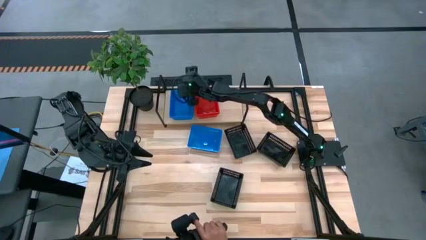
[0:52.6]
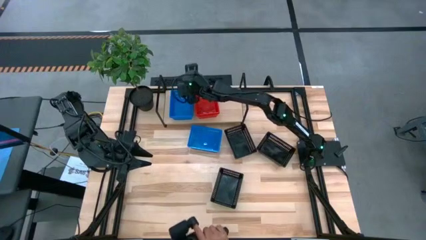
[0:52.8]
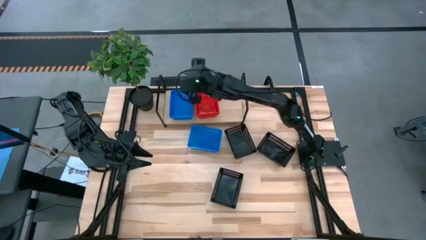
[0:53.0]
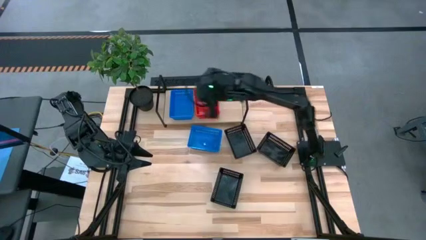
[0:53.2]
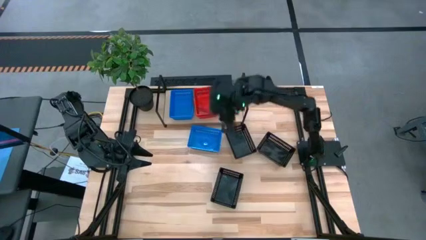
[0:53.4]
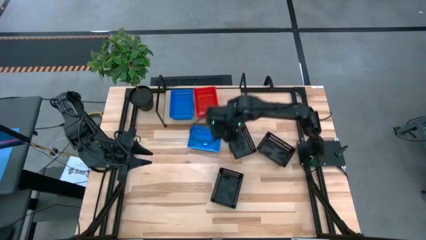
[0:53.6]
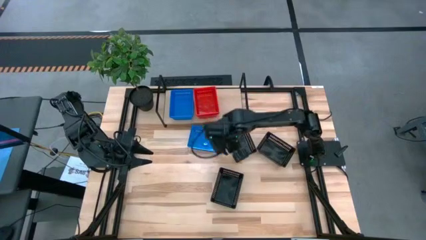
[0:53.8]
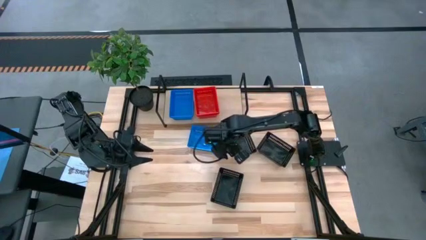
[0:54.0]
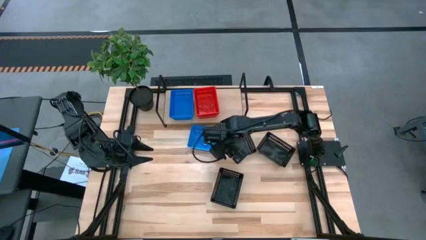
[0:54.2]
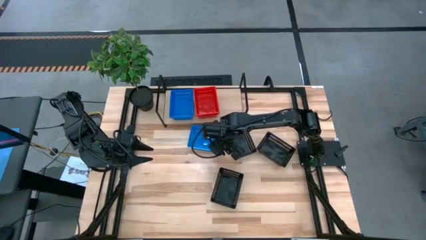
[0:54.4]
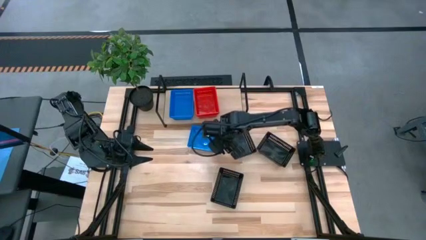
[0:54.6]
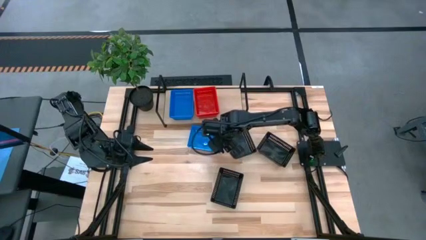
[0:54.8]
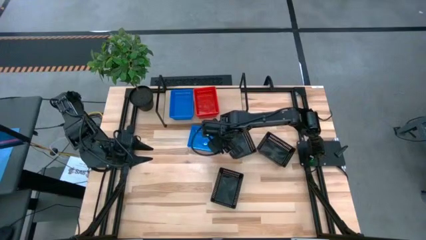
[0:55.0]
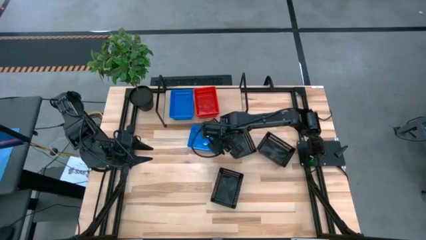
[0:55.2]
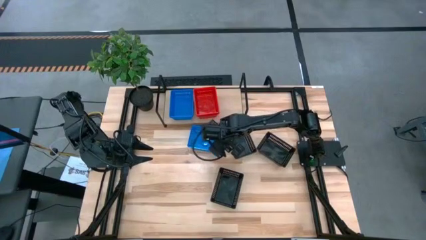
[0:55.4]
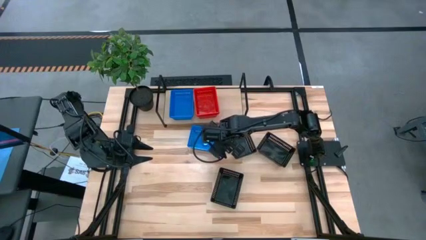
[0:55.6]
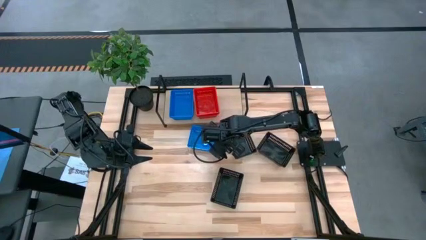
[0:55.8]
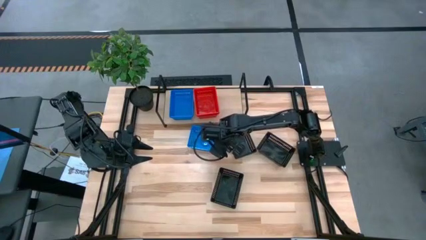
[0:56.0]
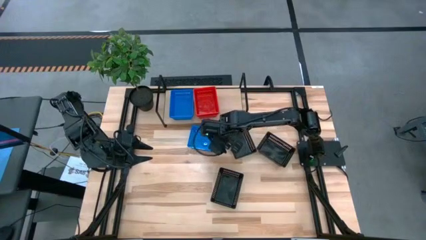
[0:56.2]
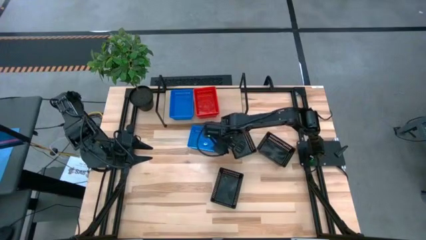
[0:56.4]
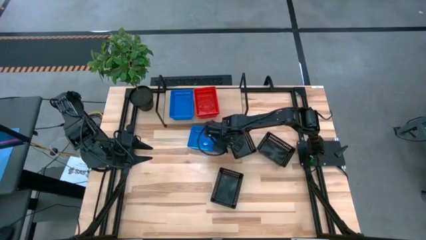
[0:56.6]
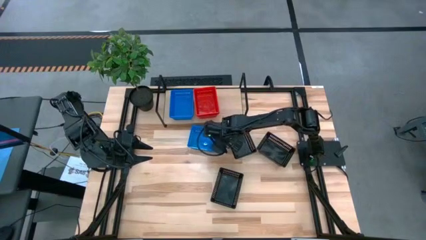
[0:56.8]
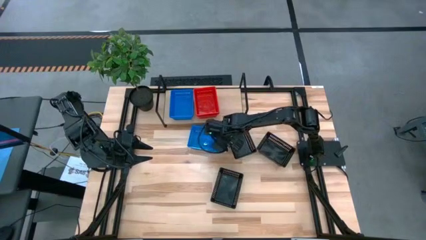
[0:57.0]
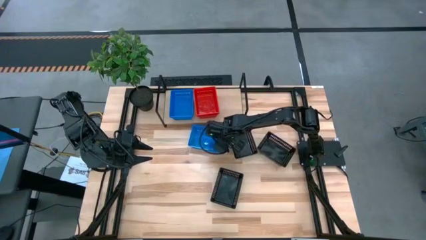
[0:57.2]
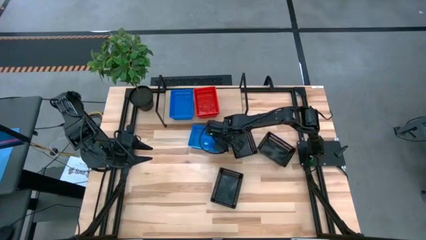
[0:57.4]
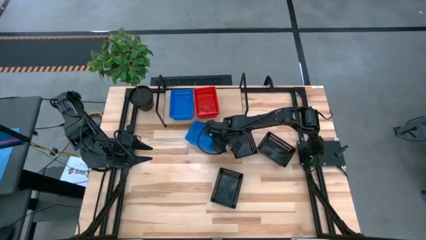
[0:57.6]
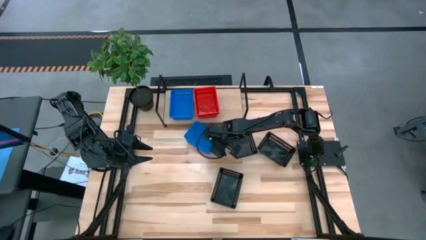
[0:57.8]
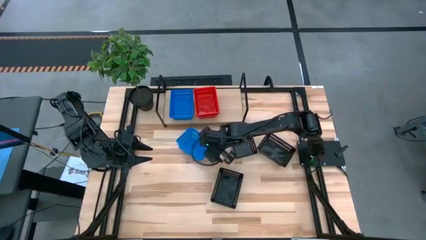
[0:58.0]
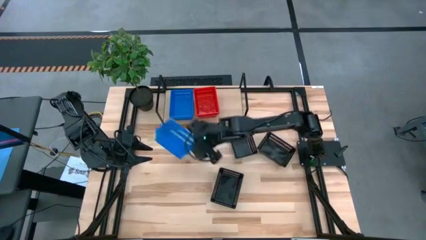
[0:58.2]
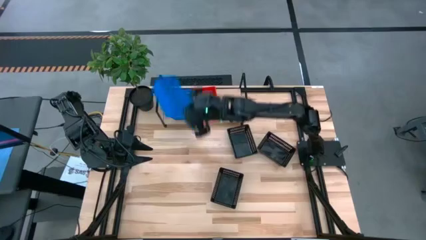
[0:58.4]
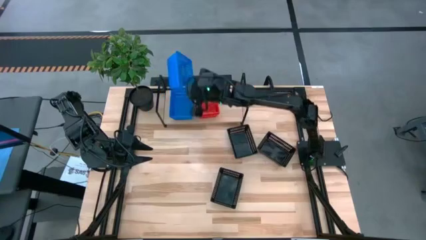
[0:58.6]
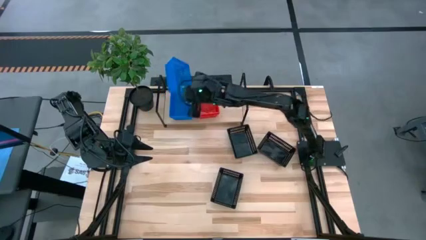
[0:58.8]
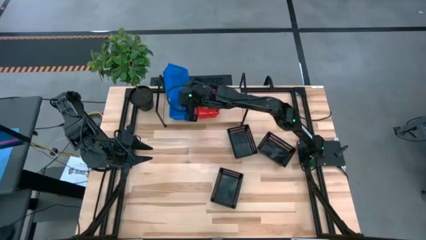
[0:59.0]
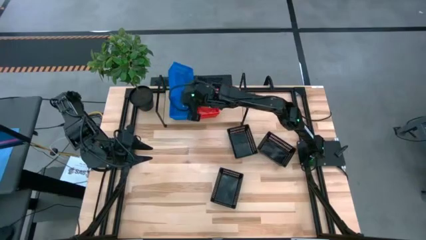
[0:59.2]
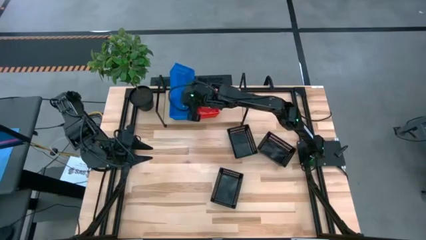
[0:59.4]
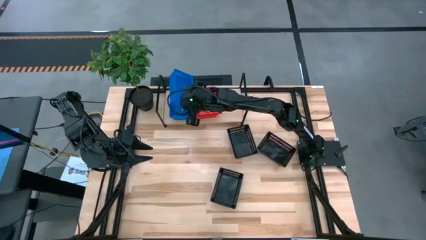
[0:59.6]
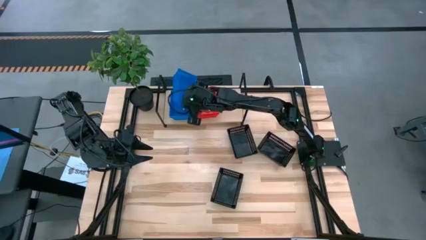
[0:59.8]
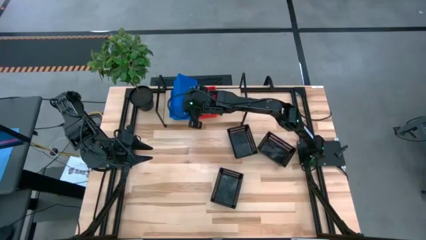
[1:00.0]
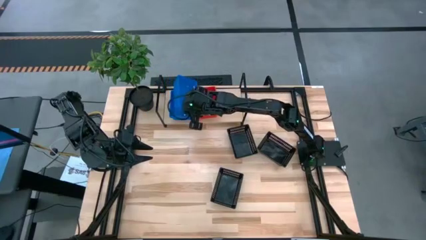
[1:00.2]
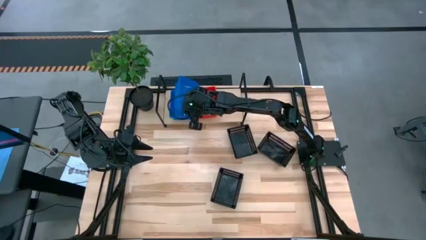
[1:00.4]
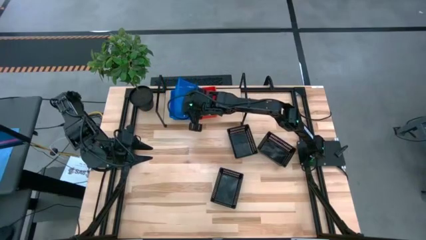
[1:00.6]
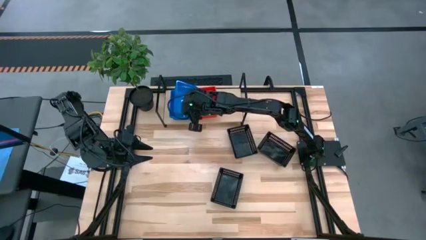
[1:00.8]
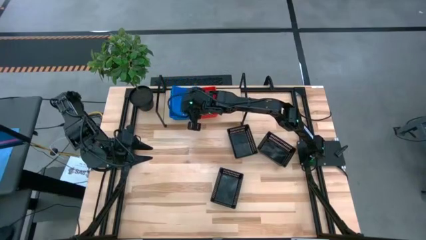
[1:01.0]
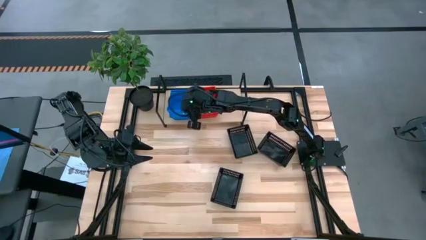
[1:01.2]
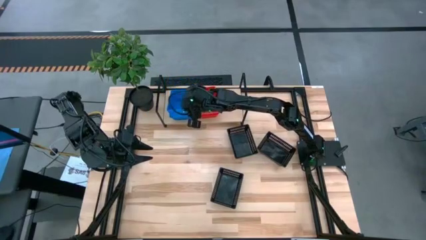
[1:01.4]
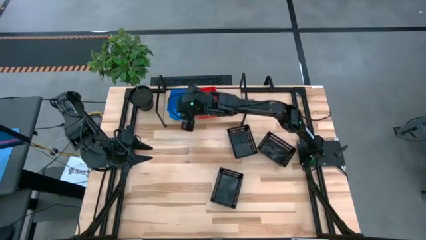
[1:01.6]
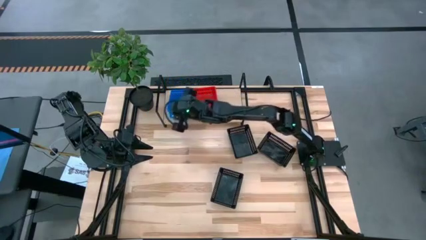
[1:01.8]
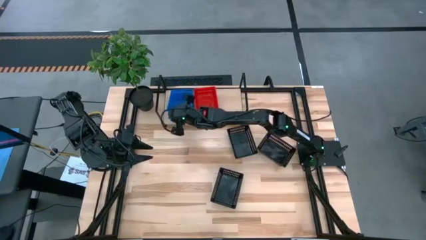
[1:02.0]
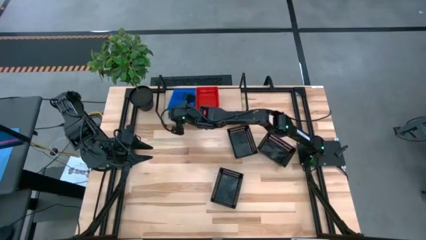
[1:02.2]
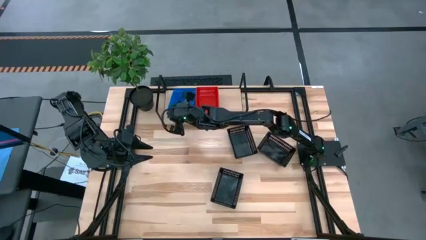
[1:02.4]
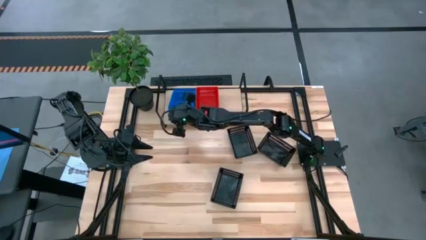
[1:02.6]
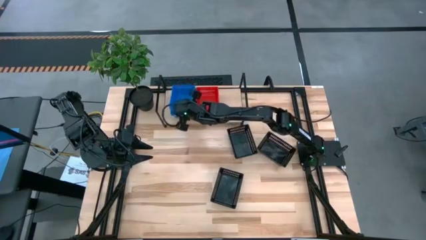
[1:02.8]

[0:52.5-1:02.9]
Task: Stack baskets on shelf by color
Stack the blue bin on the blue bin on the shelf

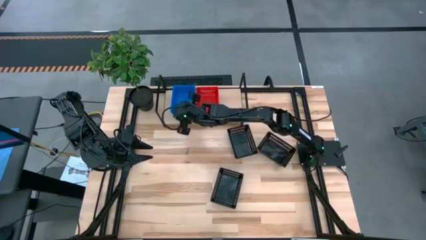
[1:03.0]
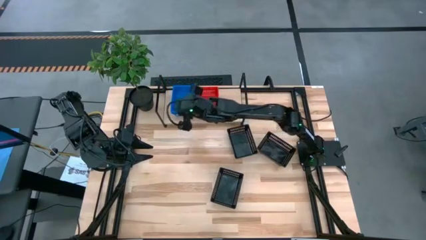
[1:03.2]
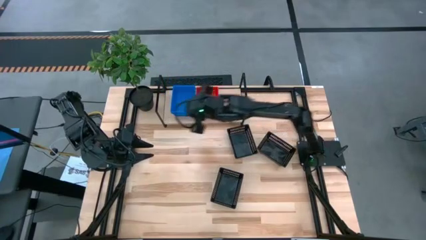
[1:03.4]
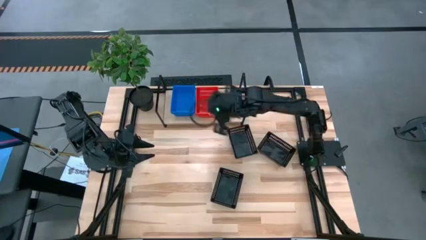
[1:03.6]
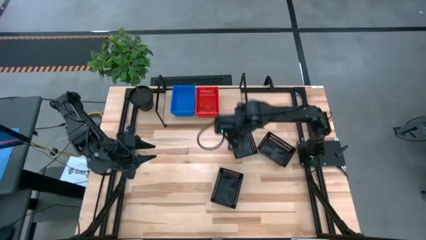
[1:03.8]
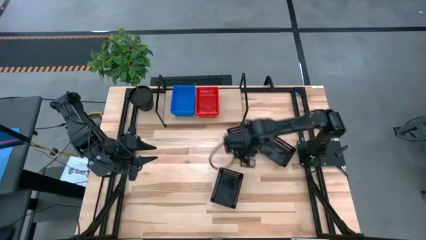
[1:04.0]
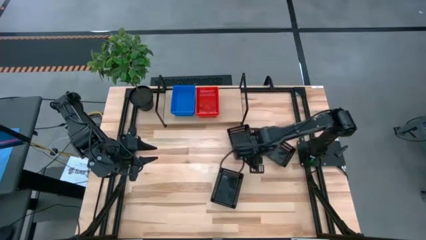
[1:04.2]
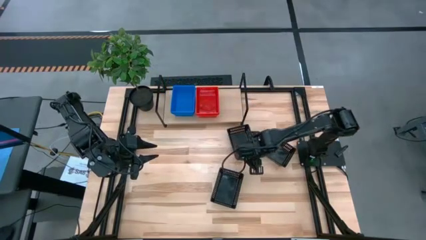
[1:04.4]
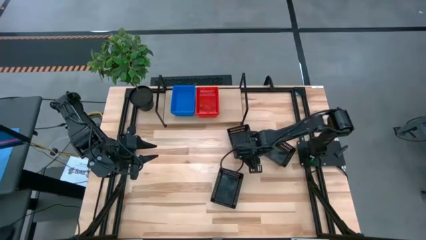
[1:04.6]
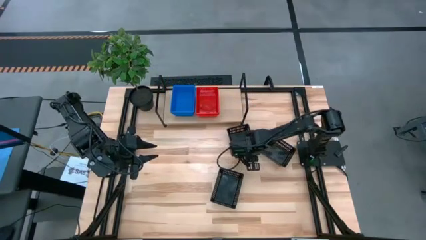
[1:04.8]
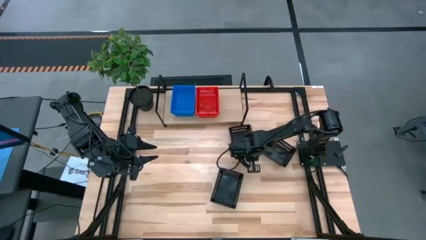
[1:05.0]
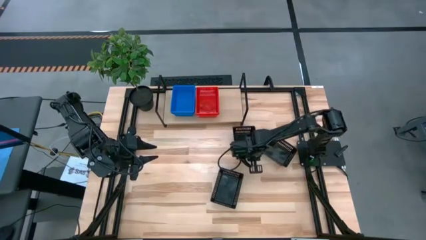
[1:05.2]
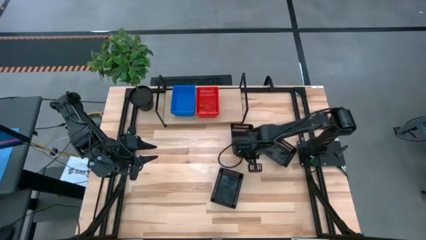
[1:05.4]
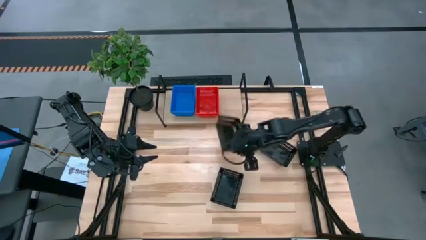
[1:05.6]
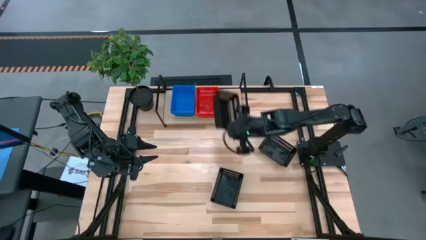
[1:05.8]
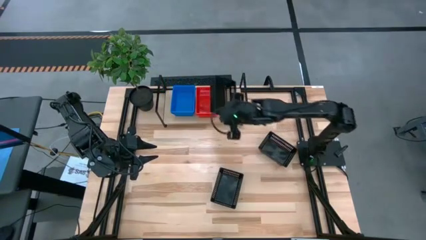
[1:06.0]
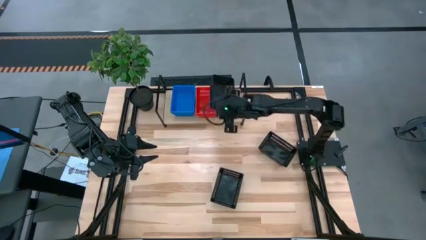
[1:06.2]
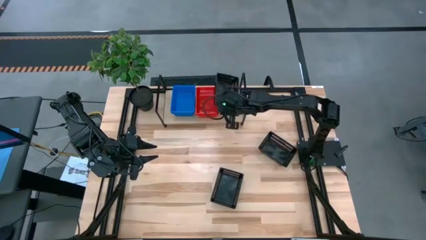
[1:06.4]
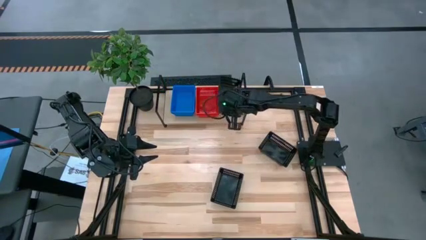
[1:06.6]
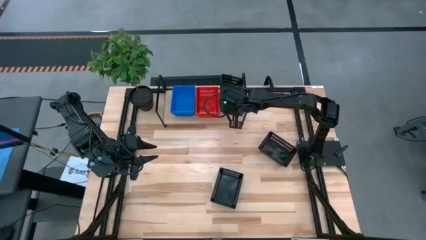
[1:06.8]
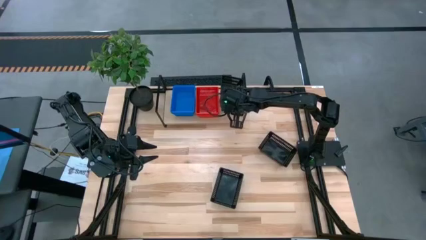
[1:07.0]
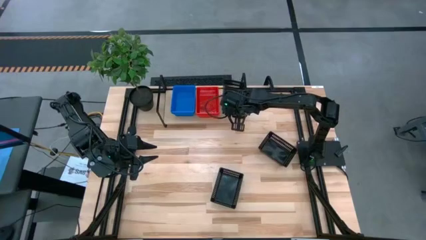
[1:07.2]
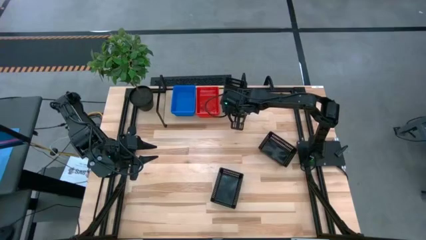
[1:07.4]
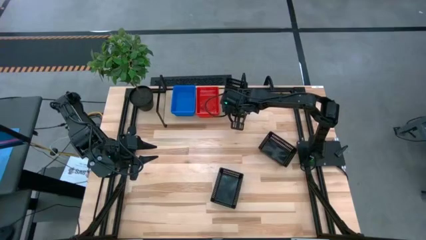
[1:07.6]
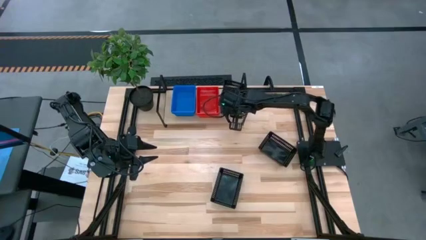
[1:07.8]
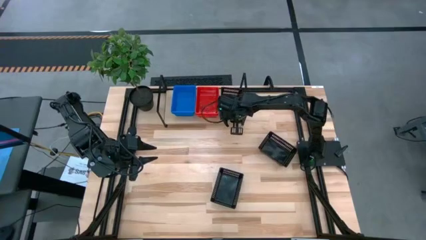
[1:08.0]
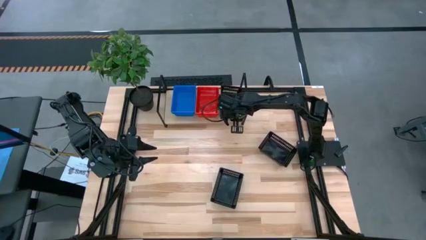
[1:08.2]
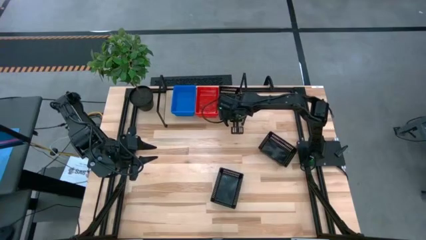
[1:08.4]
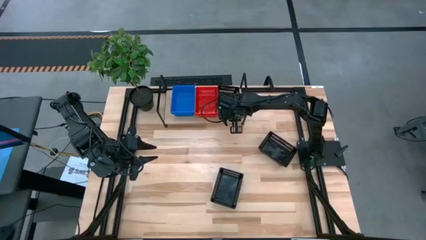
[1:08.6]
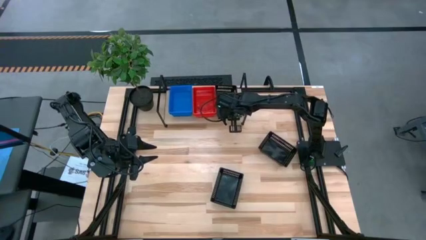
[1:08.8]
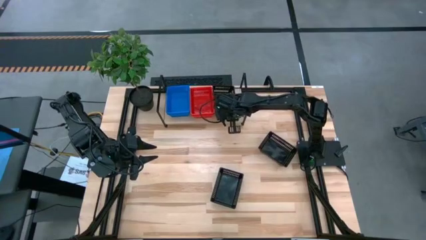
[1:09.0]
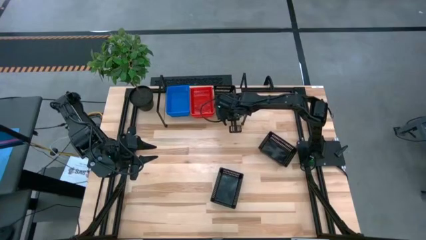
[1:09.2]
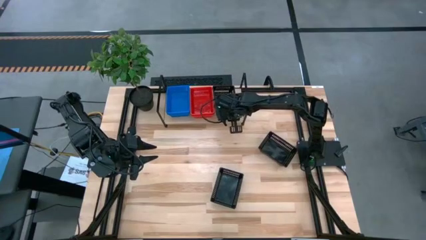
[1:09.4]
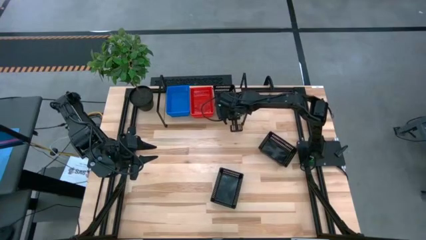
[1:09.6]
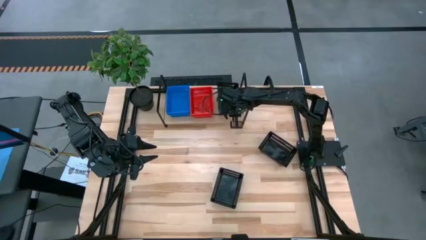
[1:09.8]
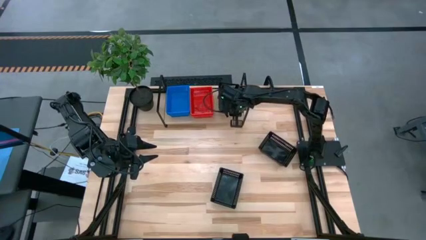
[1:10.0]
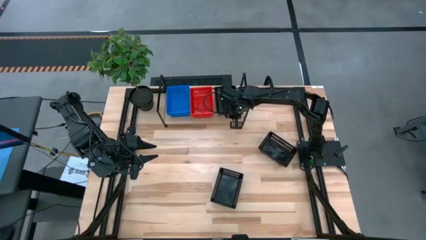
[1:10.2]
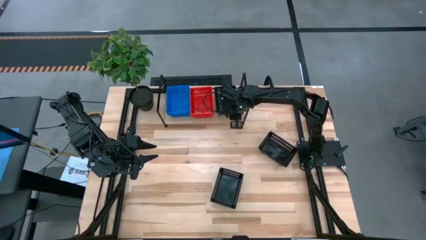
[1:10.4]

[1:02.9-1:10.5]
Put the top left black bin on the shelf
